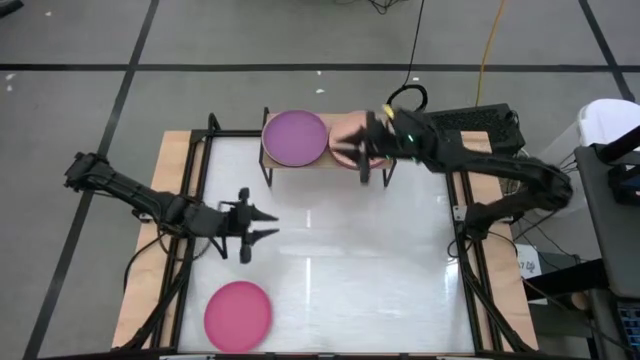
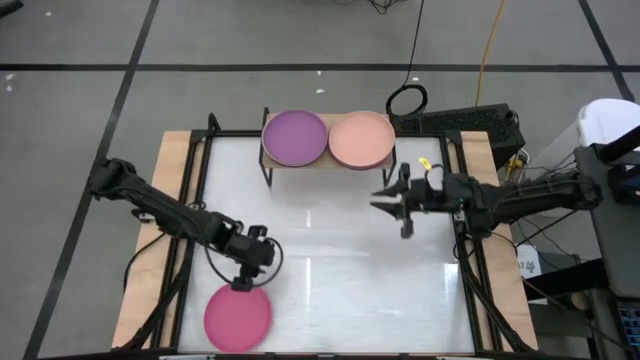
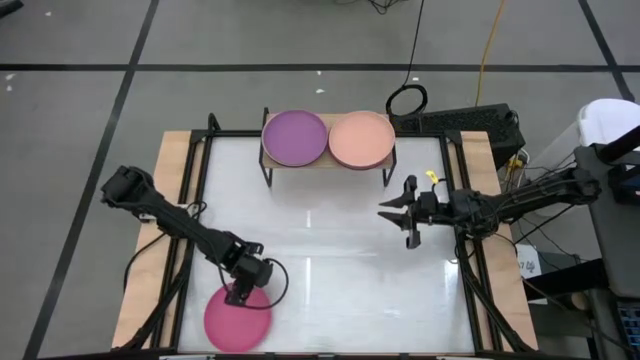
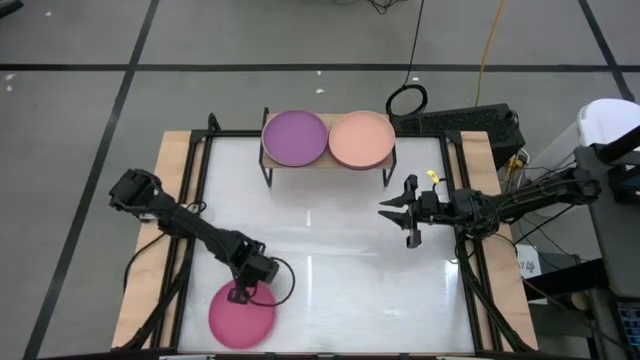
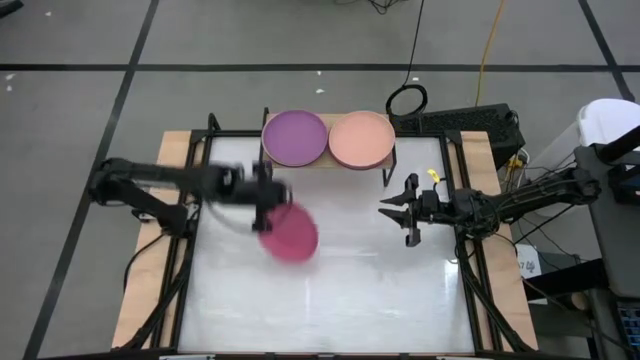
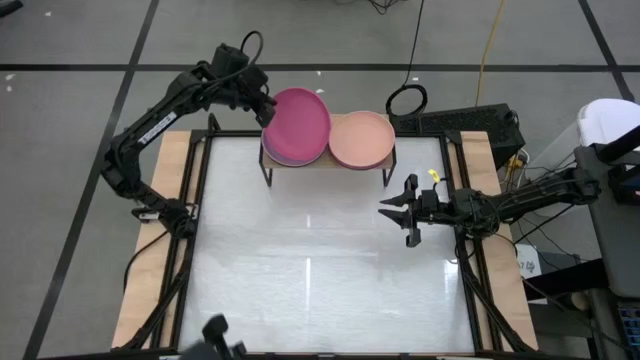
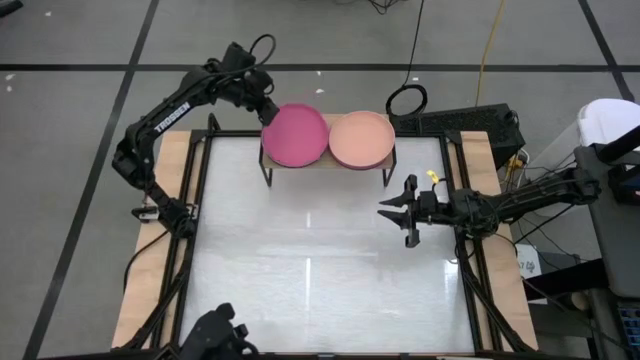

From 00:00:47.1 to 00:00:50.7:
Task: Place and stack plates onto a shelf
Stack the pink plate on top of the violet plate on the shelf

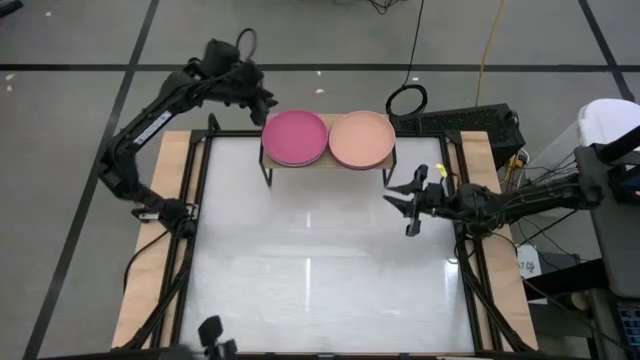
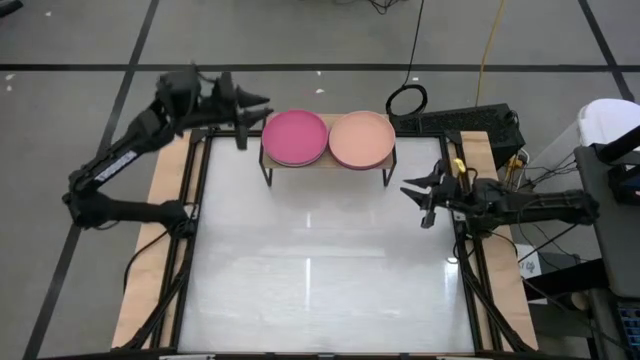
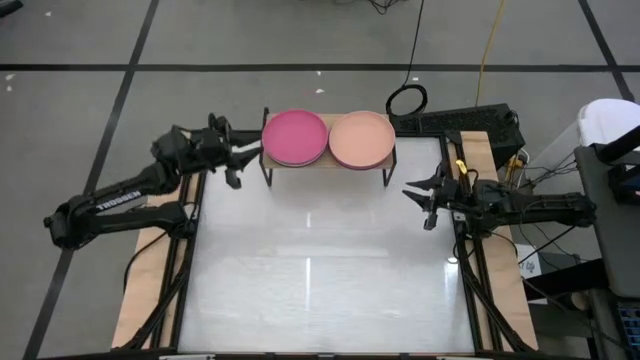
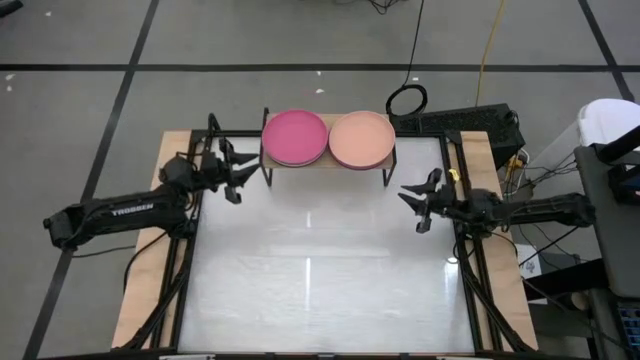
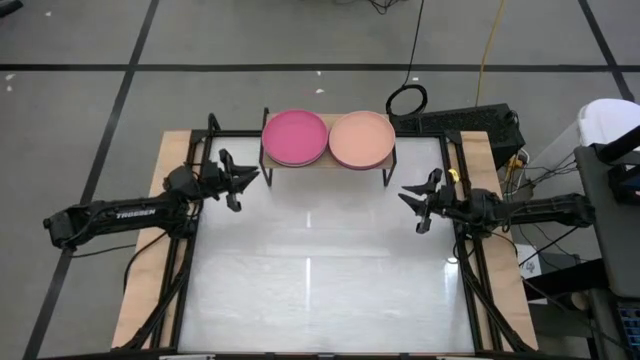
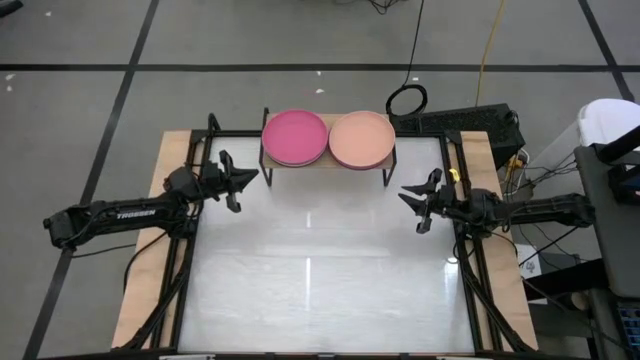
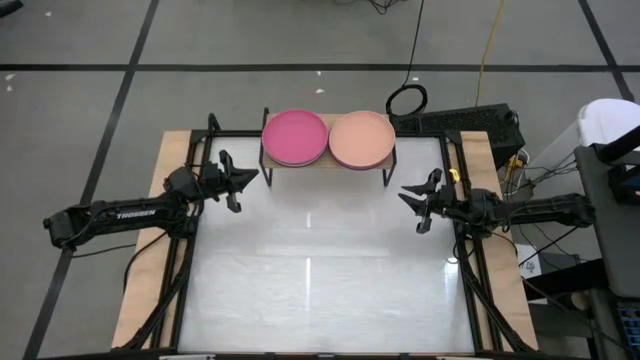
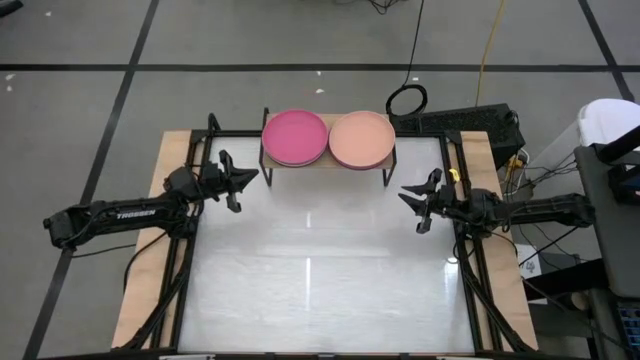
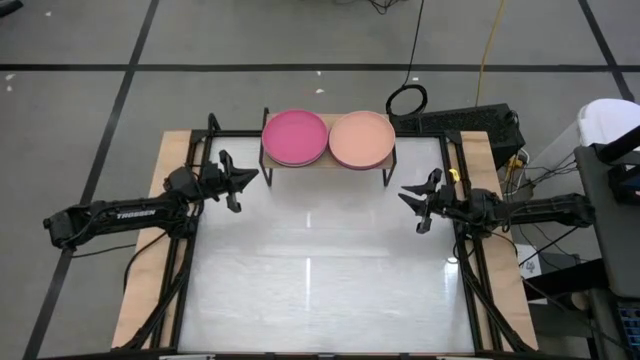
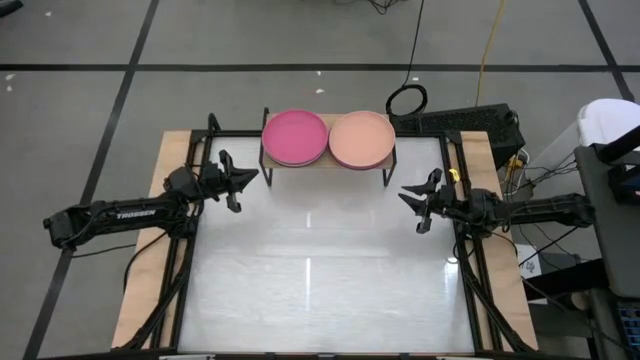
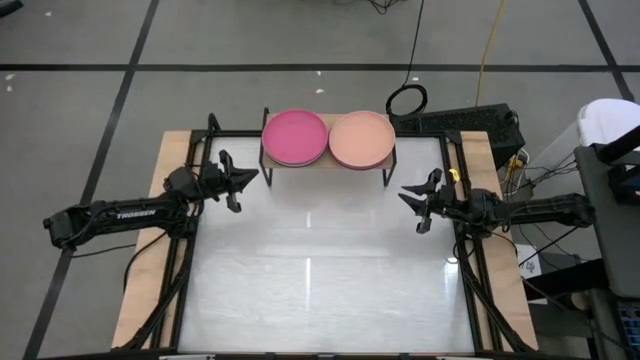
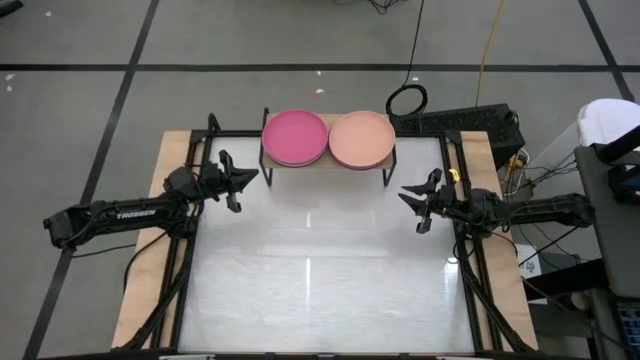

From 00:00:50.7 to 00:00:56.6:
Return to Home Position

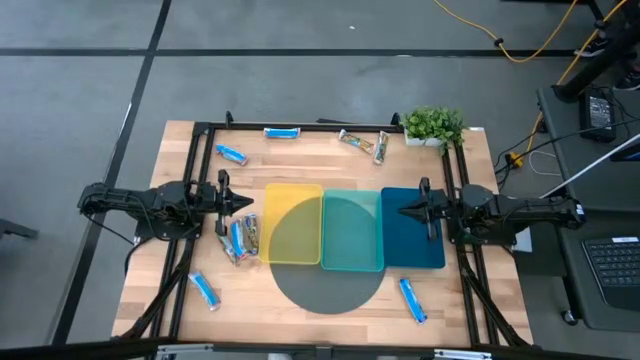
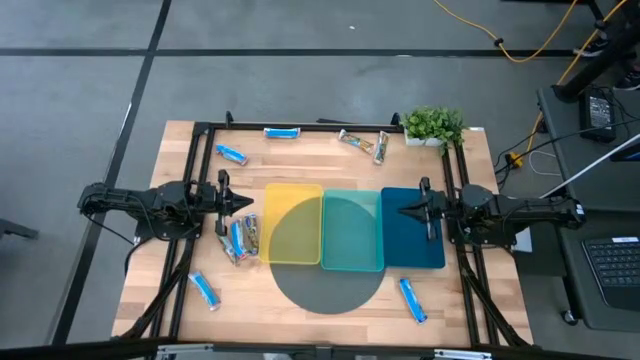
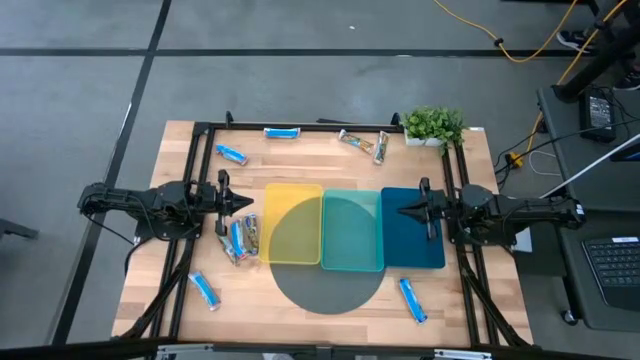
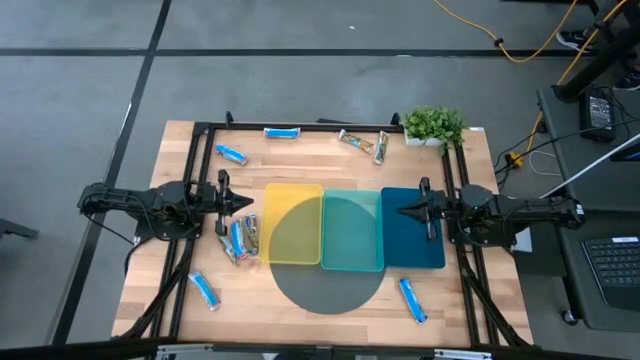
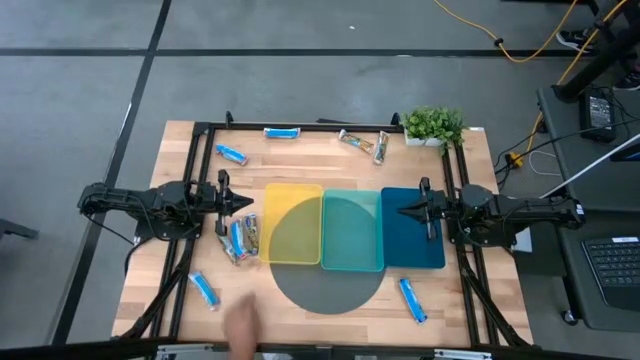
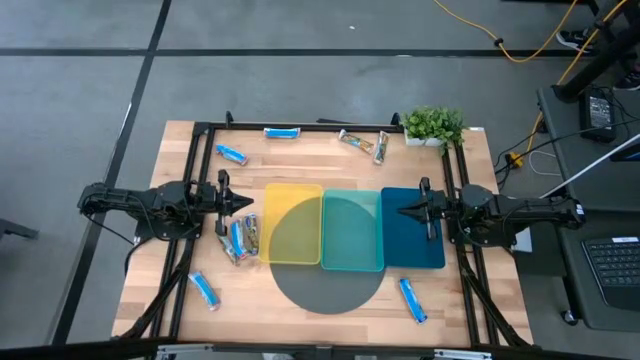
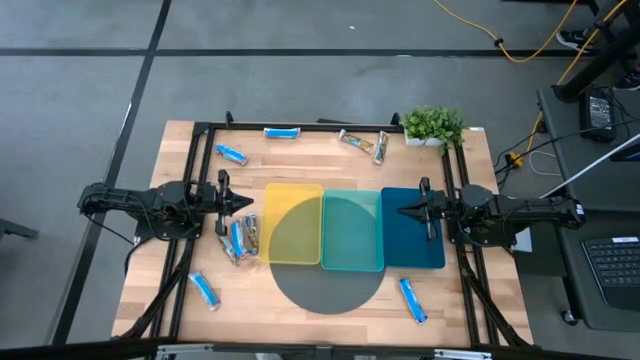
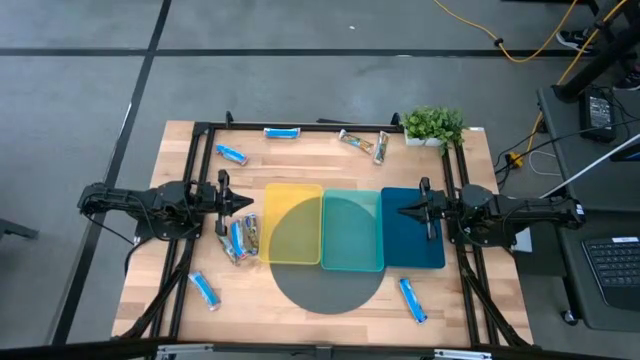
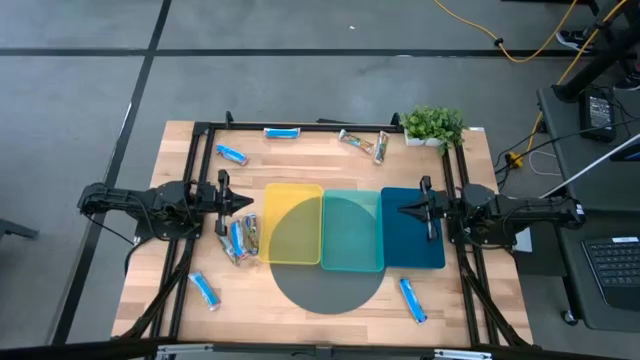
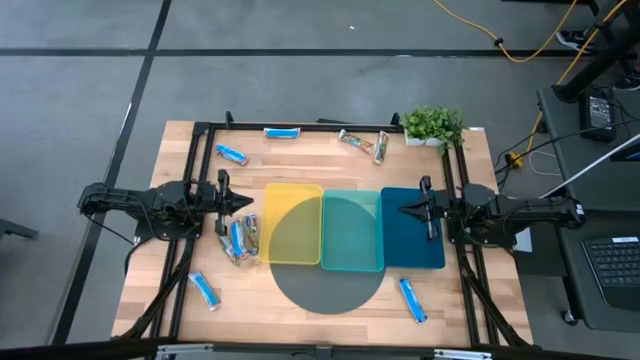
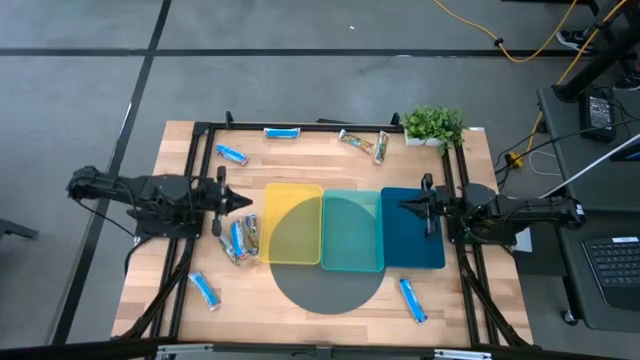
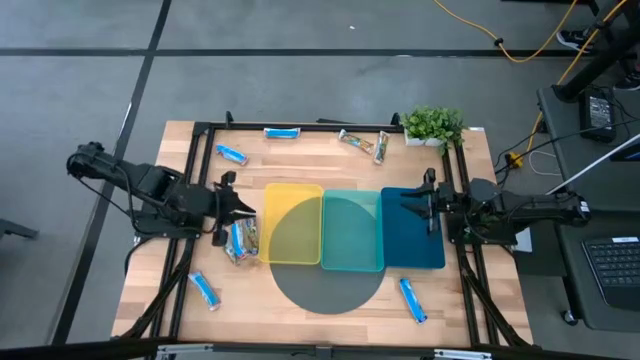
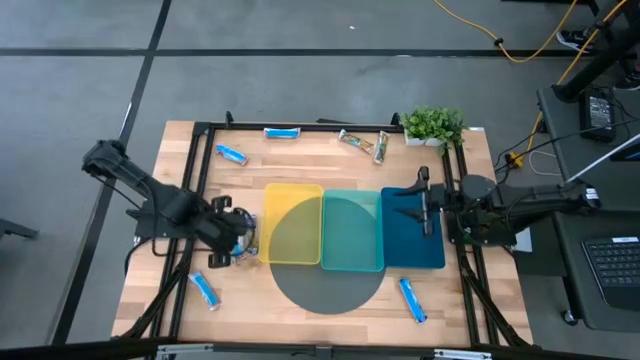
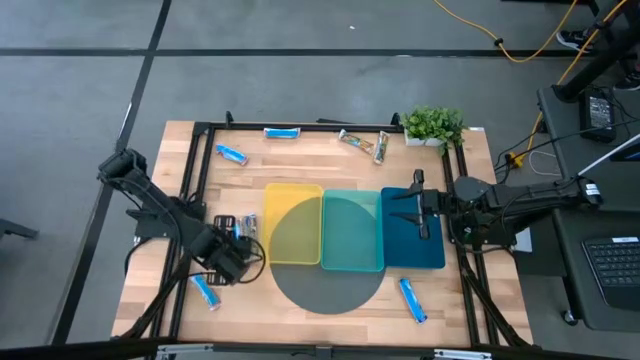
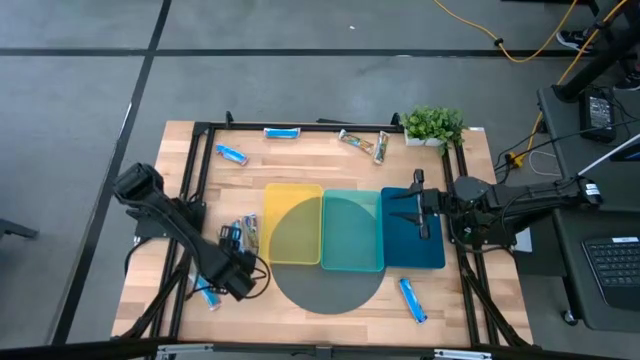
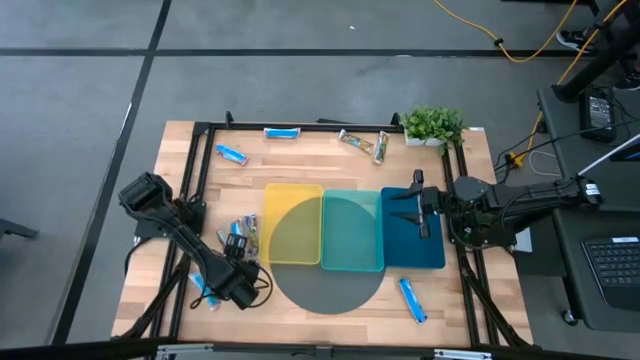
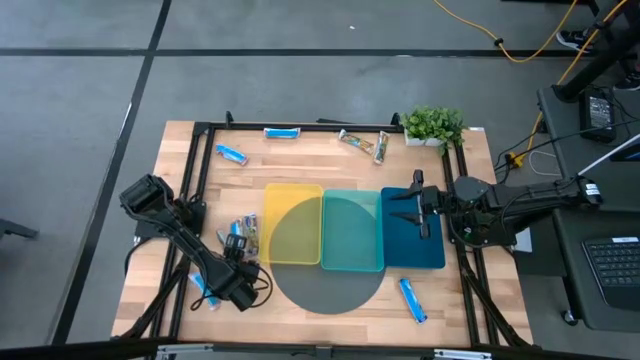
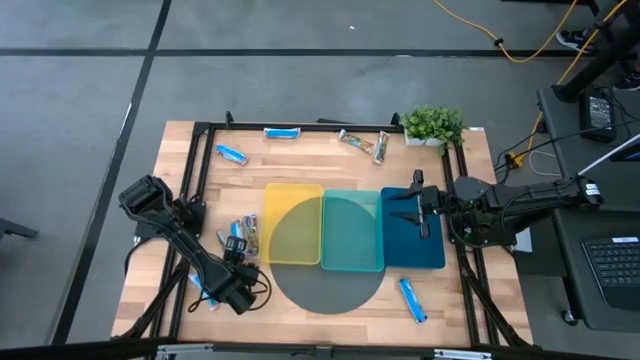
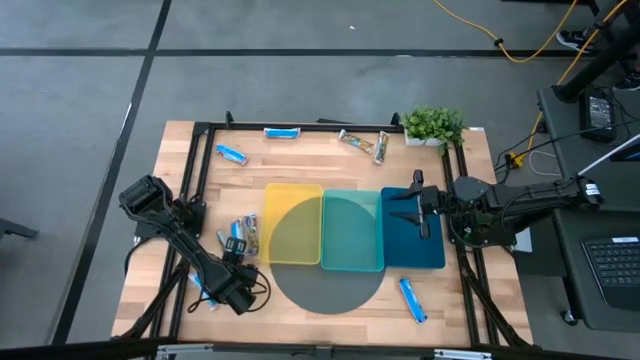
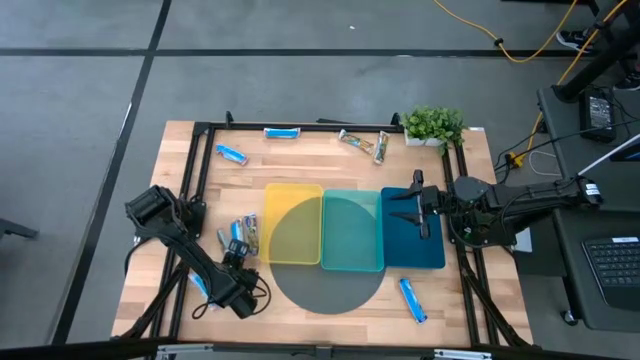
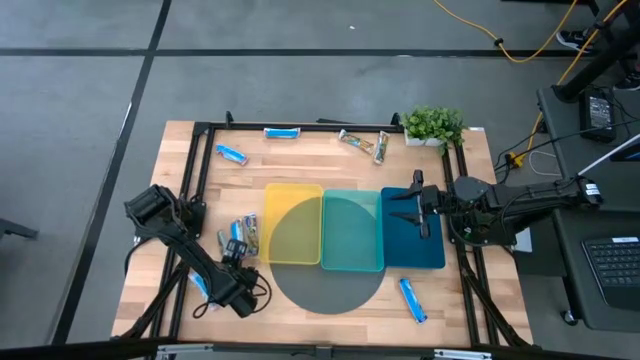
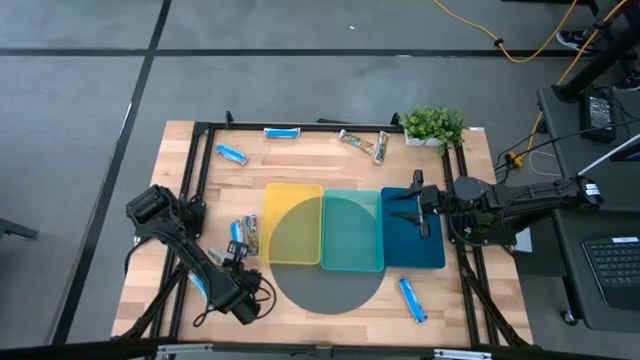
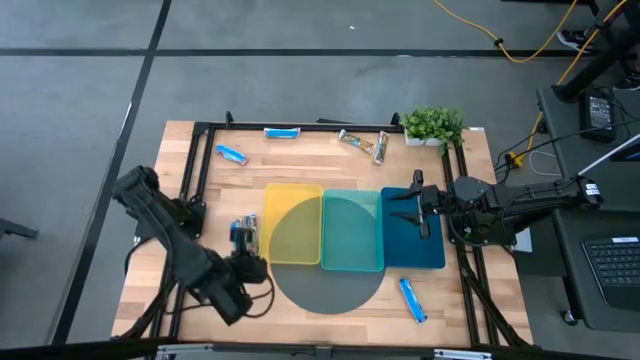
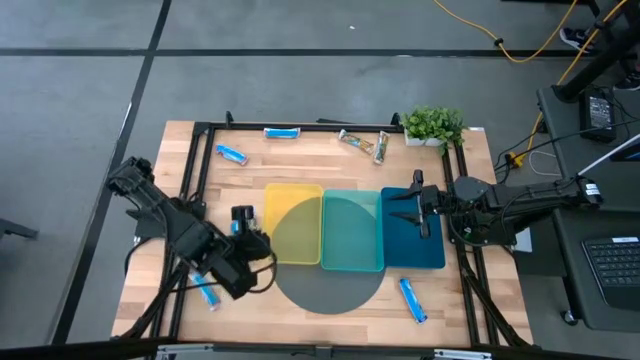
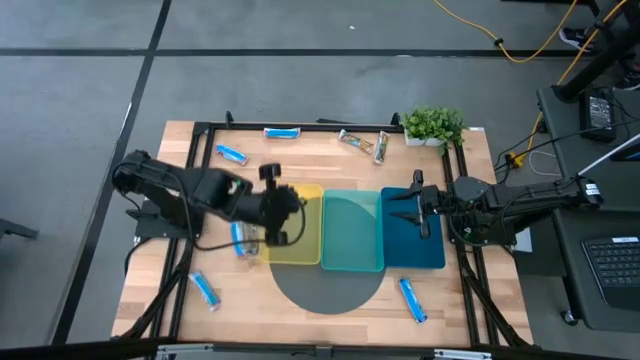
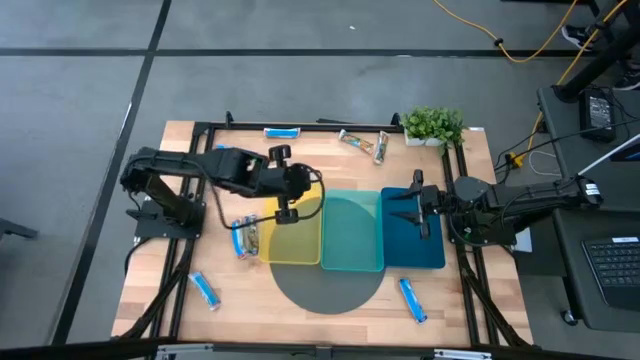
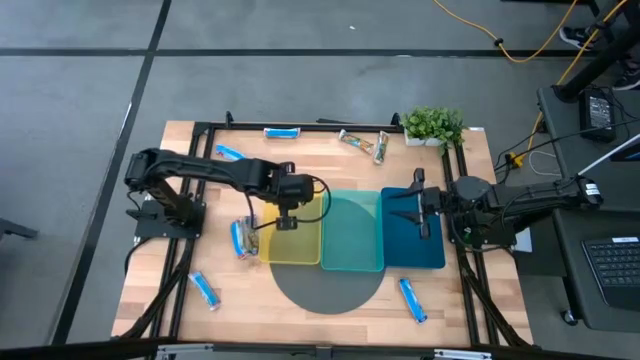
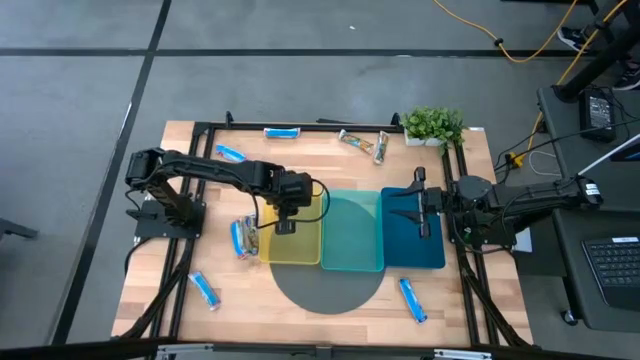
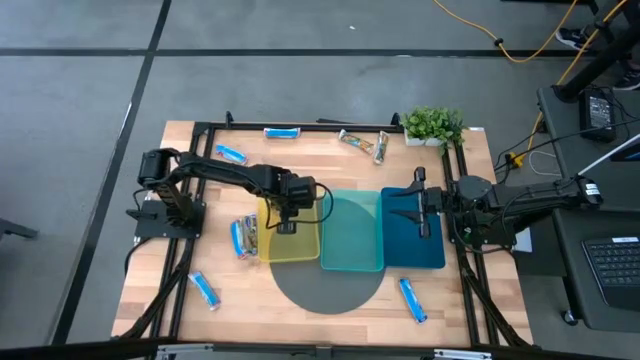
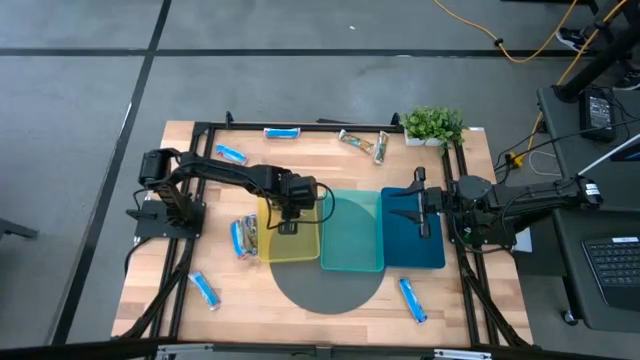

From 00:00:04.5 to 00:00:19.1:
Task: Pick and place Granola Bars by type
Put the yellow granola bar into the yellow bin
